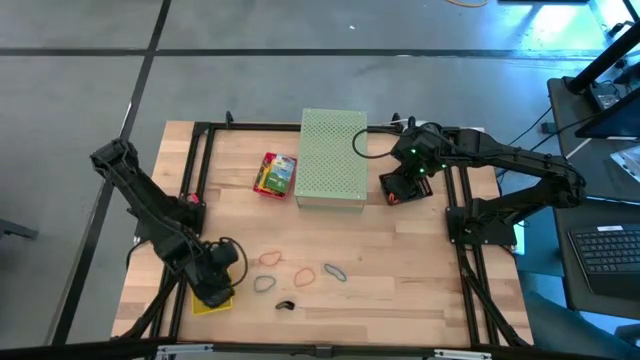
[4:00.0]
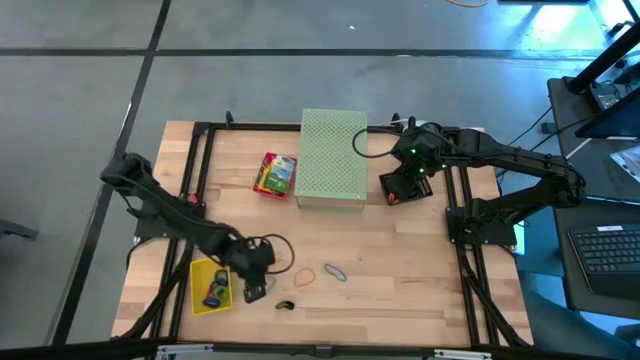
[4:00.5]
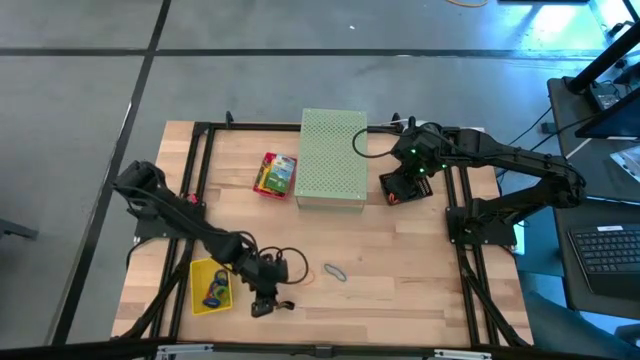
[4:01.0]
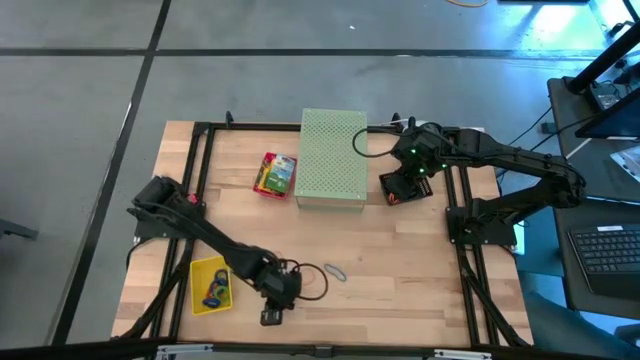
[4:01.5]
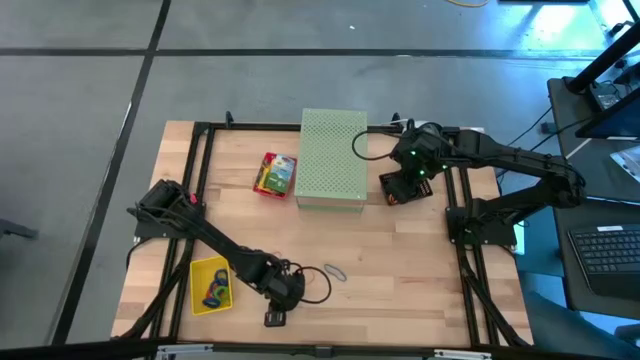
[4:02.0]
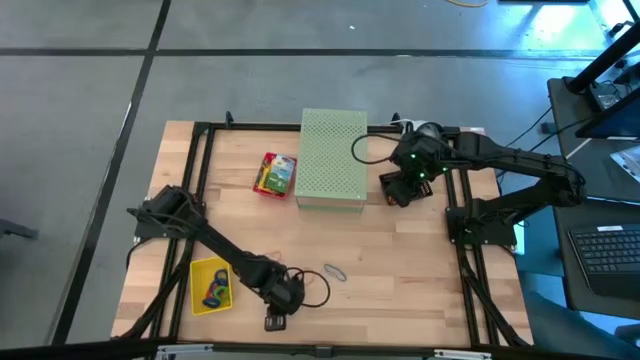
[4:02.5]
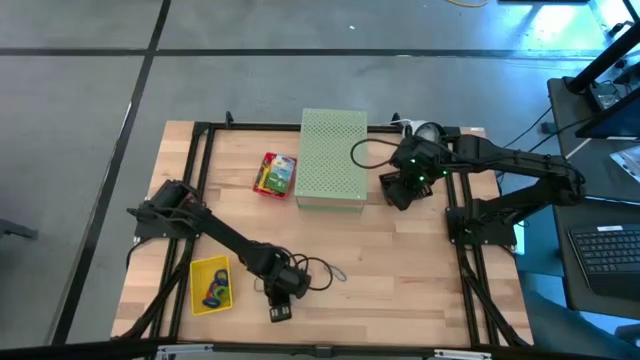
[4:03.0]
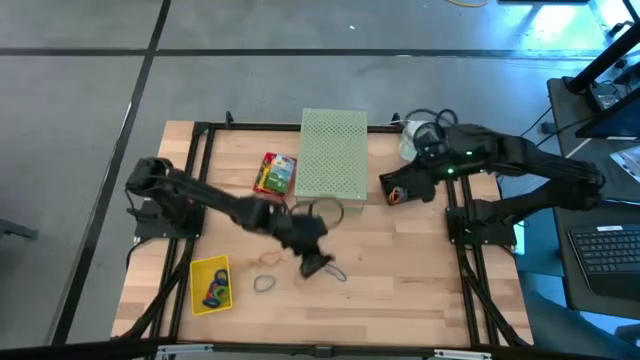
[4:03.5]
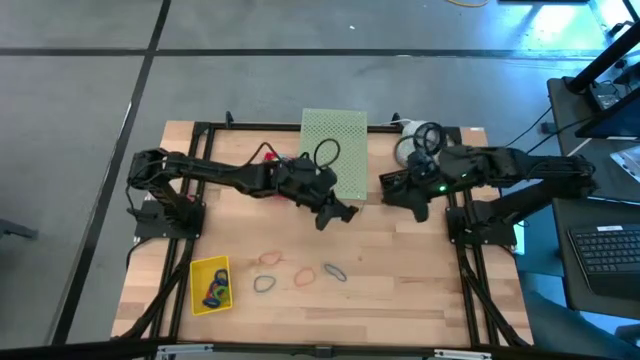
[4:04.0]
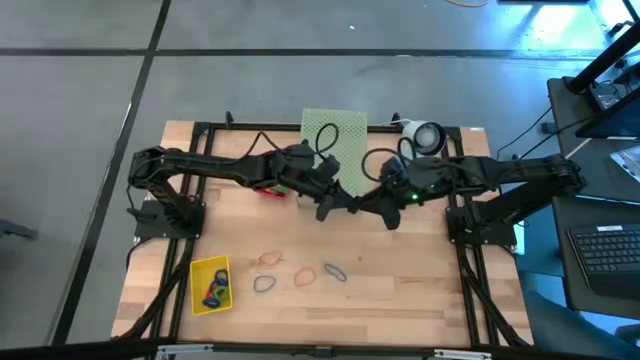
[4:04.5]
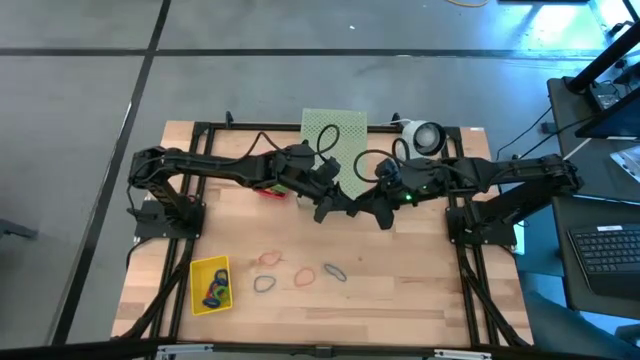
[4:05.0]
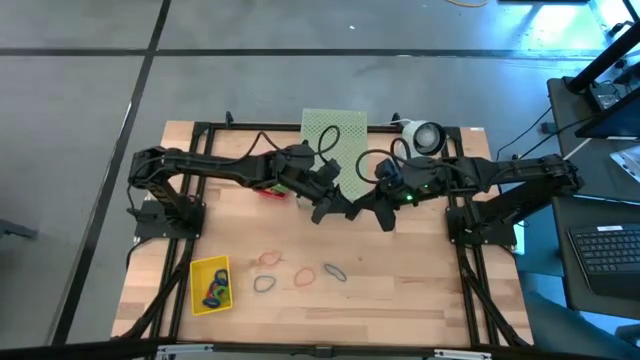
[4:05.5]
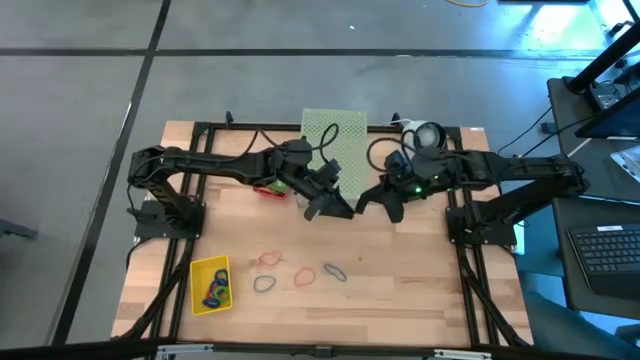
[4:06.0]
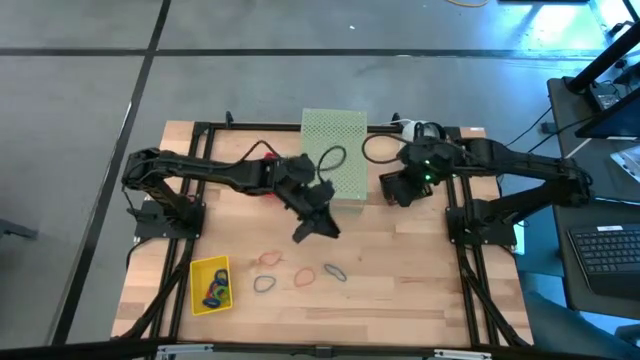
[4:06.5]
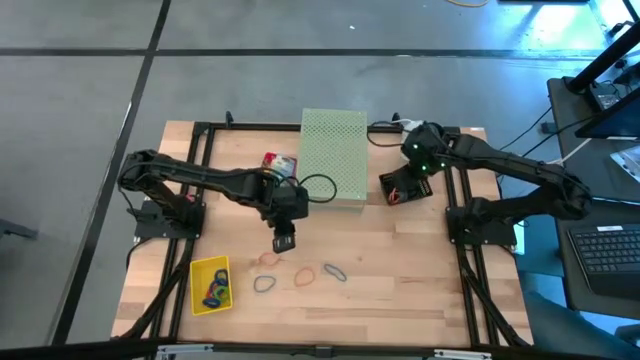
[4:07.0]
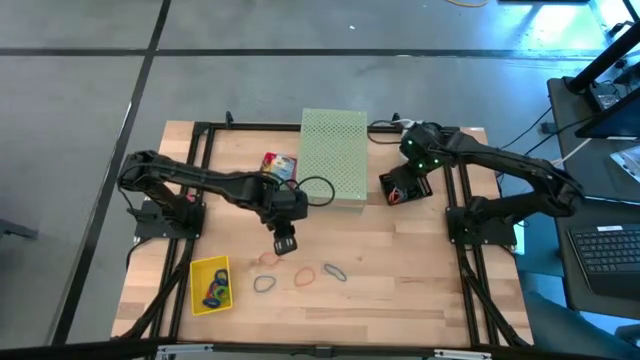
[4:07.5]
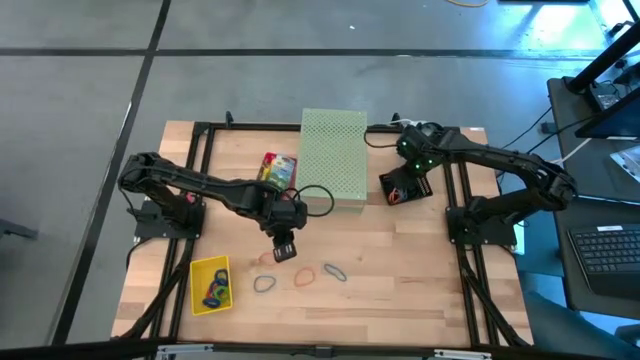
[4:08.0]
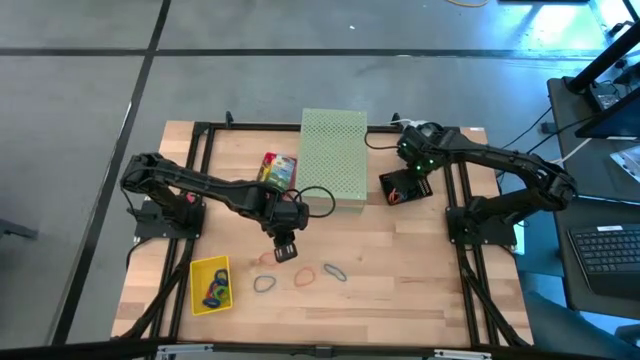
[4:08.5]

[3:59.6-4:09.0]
Task: Pick & Place Office Desk Supplies
Put the black rubber band into the black bin

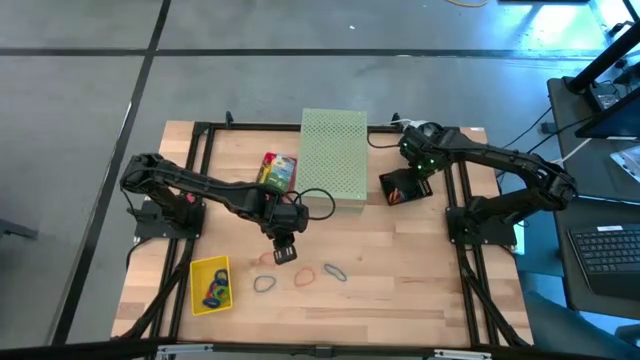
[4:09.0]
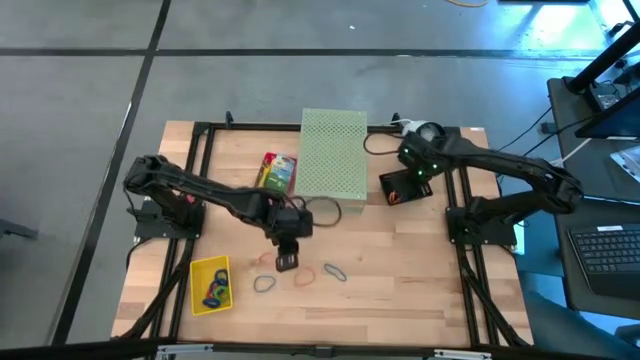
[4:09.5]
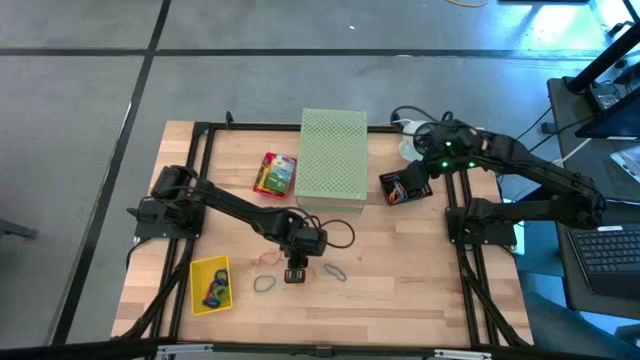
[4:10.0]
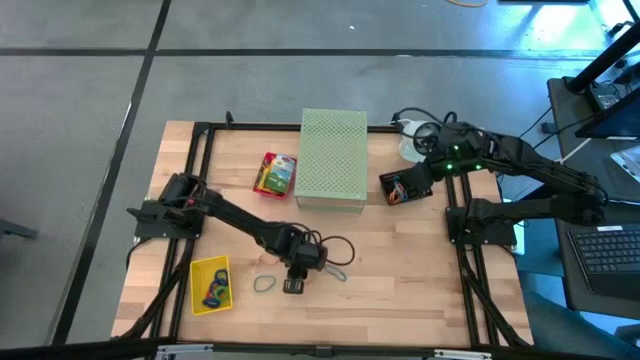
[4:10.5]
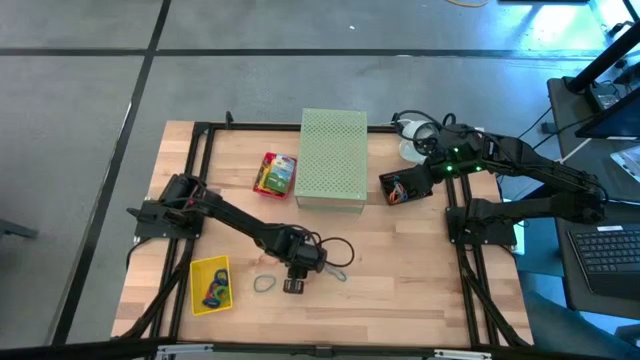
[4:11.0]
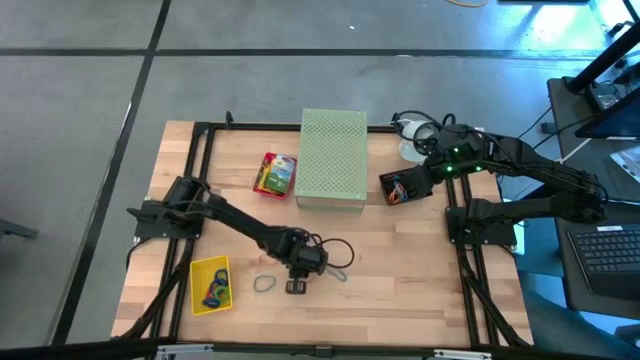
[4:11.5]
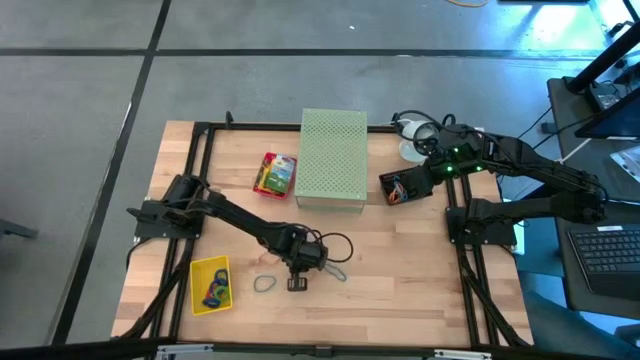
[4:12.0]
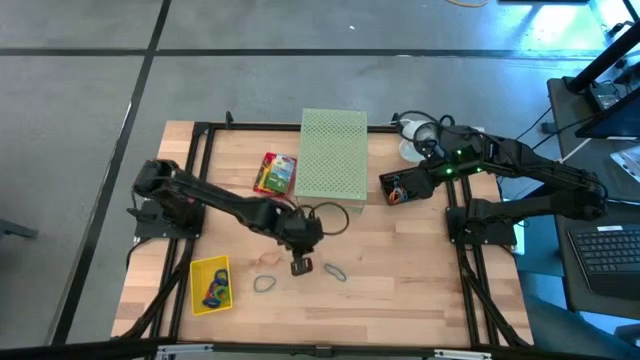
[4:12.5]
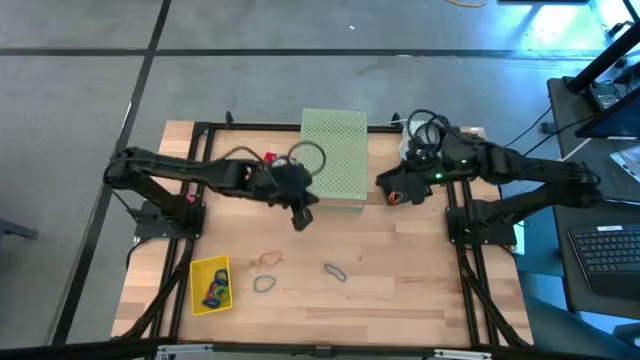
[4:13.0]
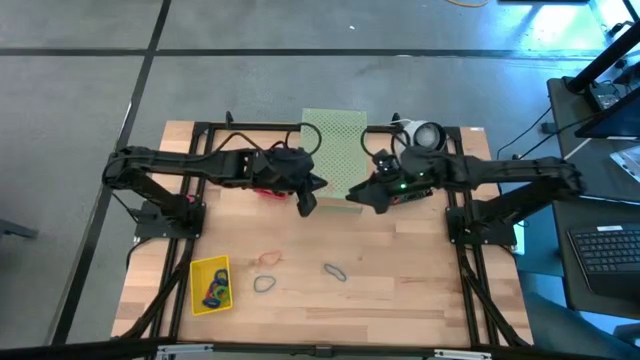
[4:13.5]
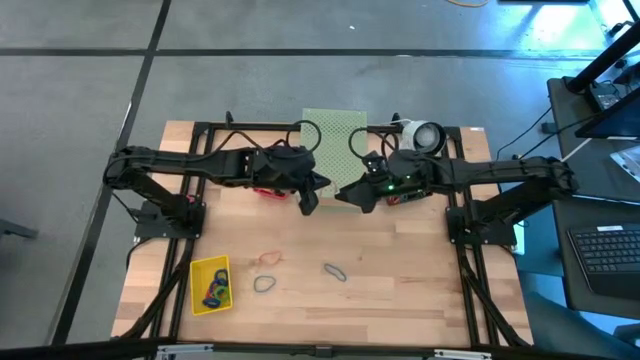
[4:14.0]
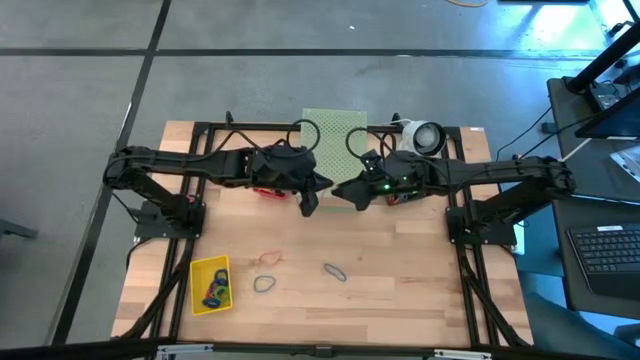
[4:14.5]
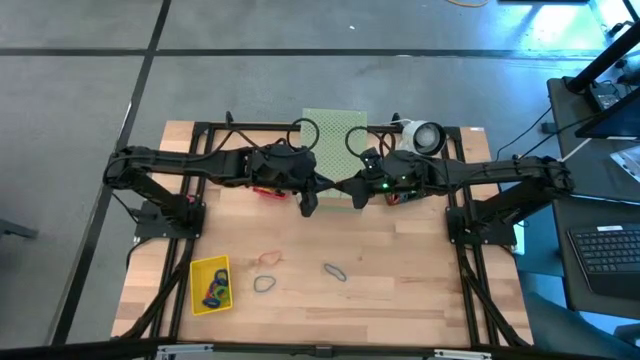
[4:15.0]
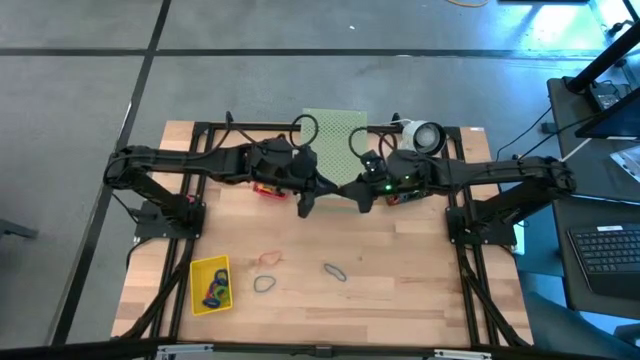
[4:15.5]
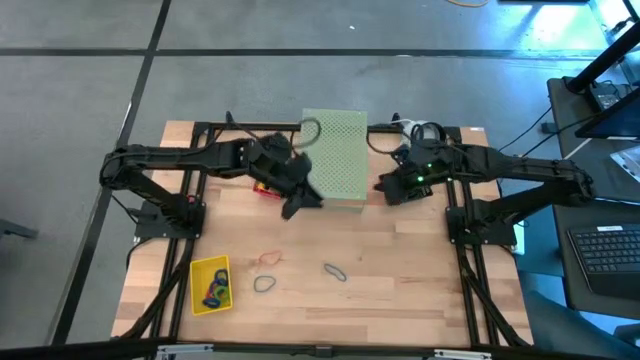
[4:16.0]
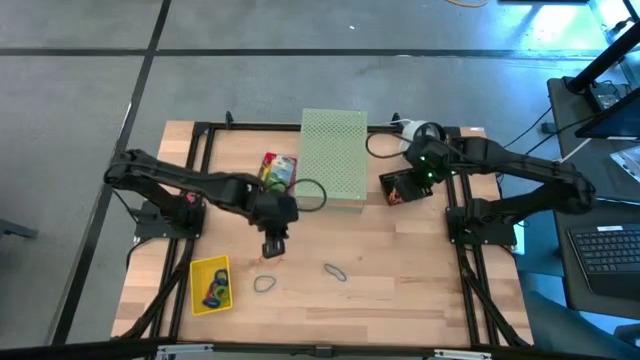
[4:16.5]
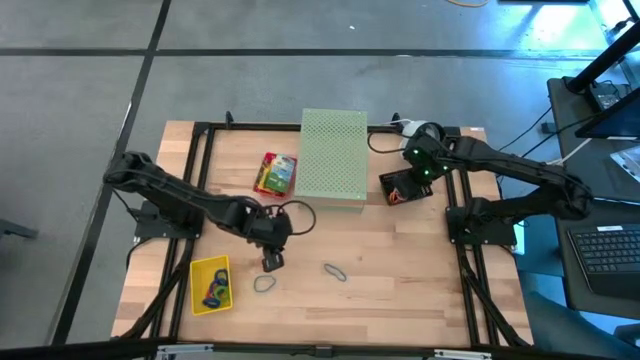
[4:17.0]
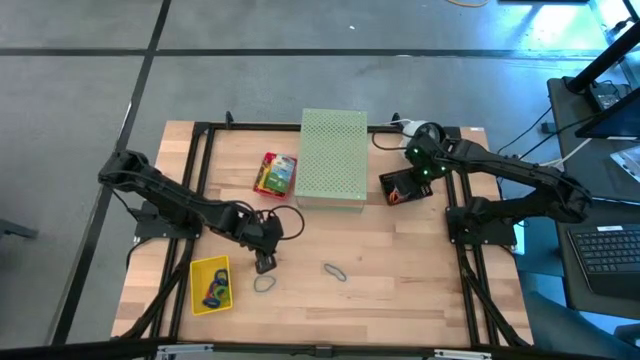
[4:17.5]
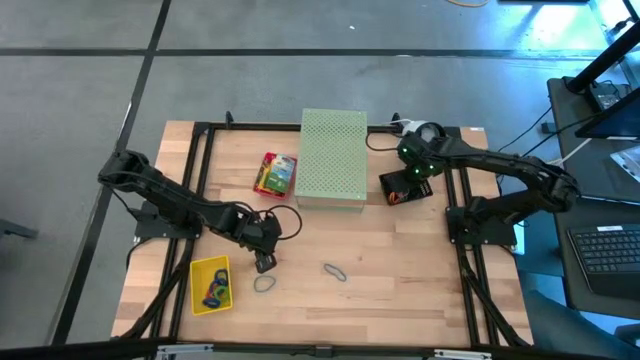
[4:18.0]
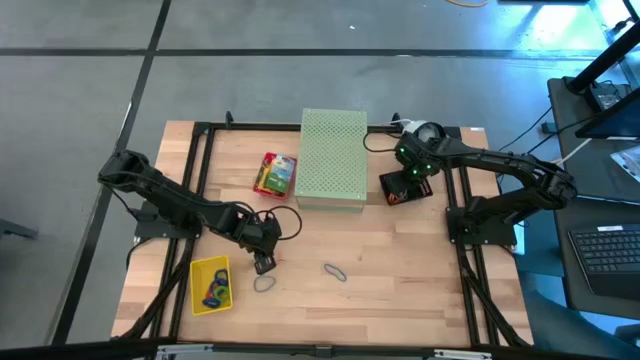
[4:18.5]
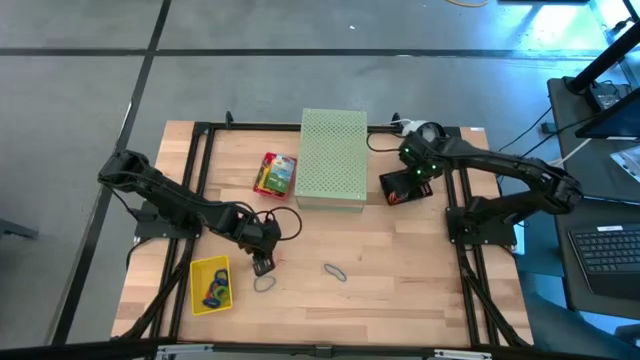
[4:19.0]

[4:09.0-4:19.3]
Put the orange rubber band into the black bin
